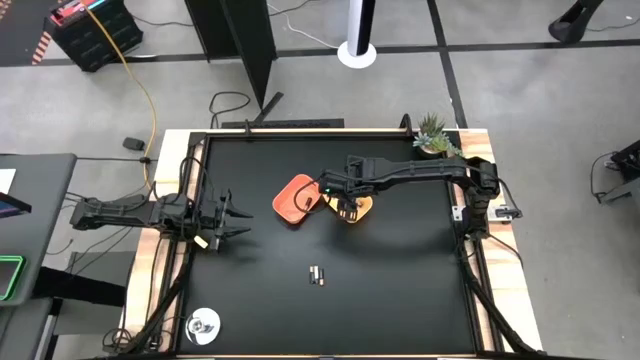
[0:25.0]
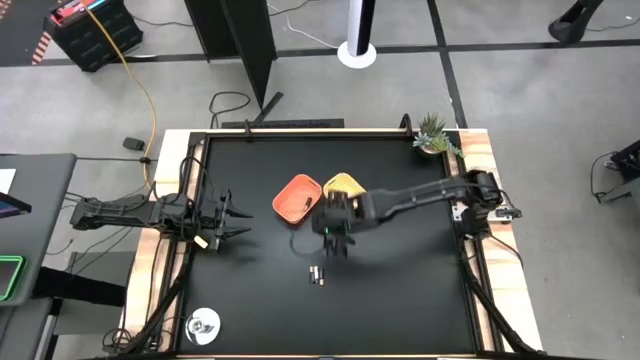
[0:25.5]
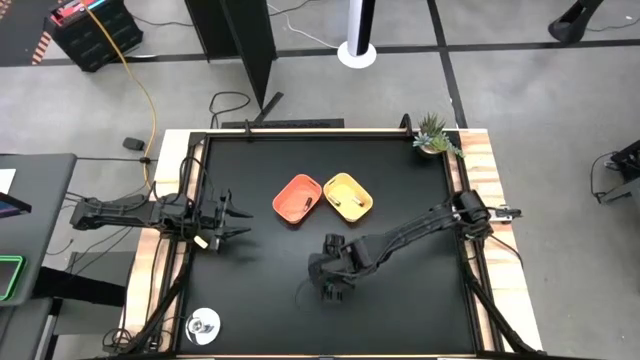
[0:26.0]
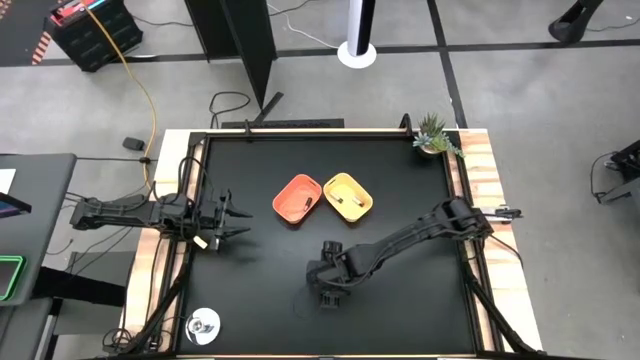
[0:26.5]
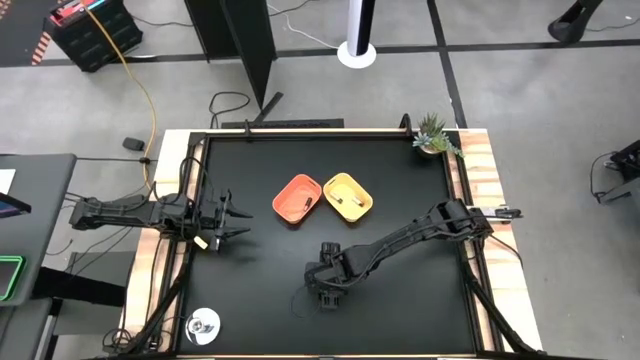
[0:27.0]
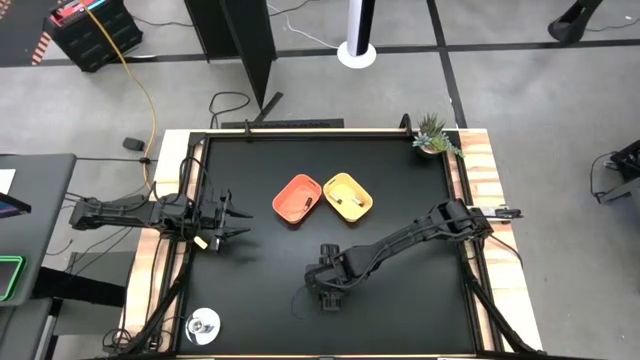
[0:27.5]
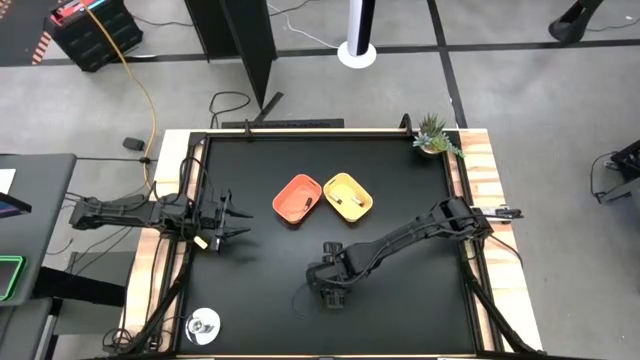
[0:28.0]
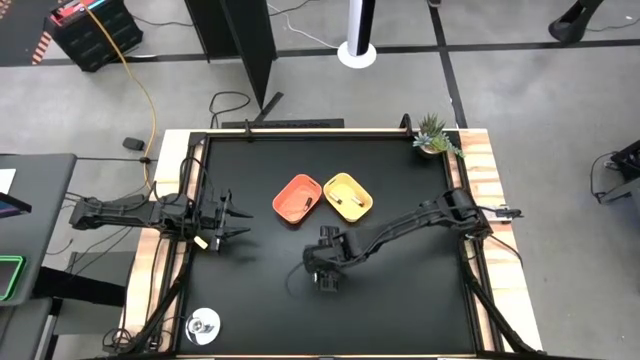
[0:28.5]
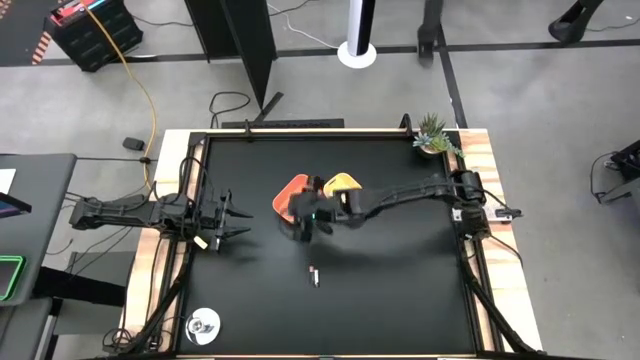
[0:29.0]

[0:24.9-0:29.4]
Task: Sort batteries
Put the black battery into the orange bin

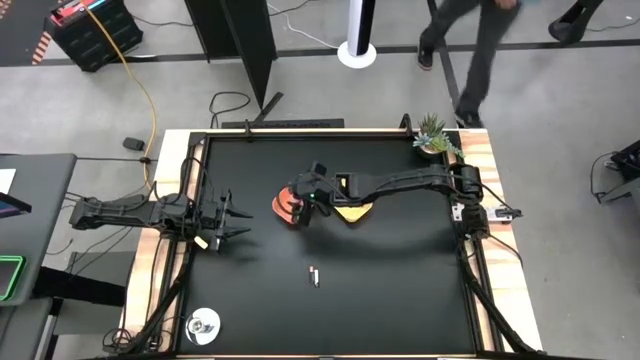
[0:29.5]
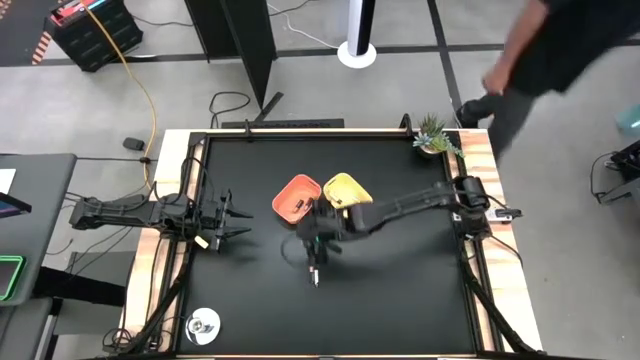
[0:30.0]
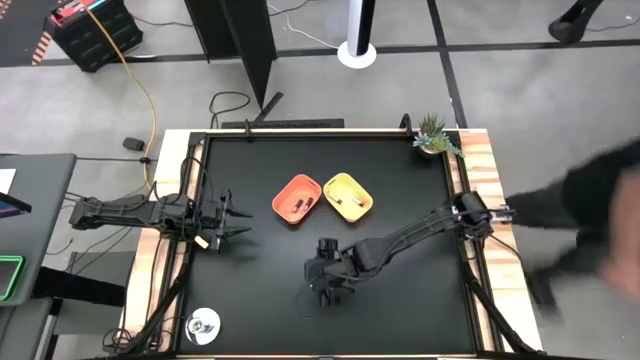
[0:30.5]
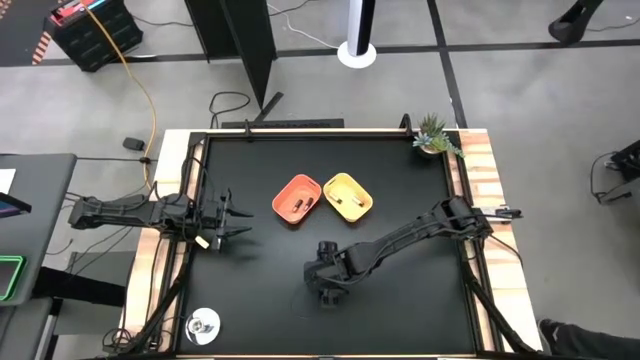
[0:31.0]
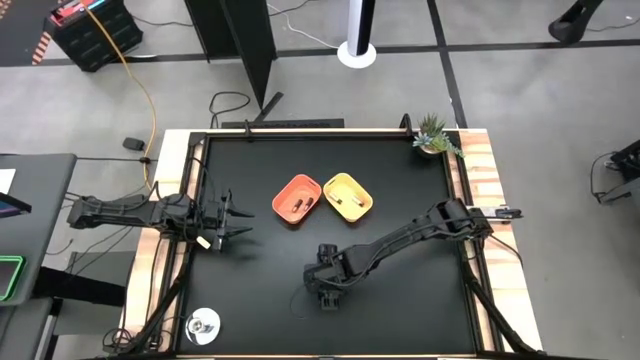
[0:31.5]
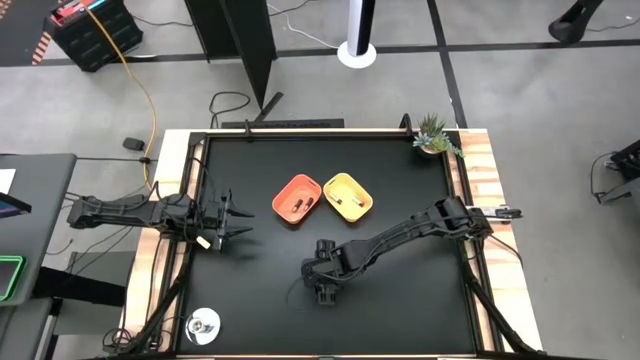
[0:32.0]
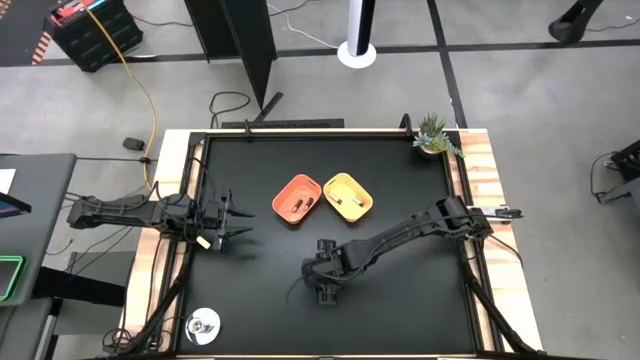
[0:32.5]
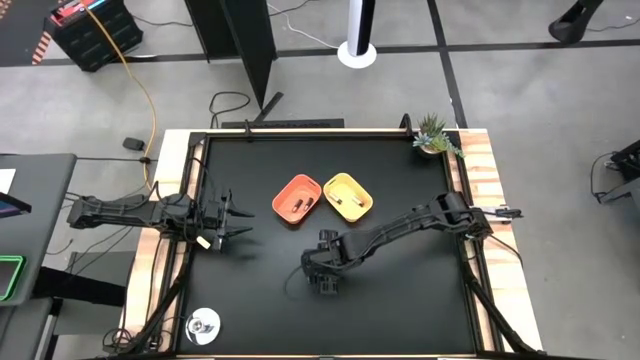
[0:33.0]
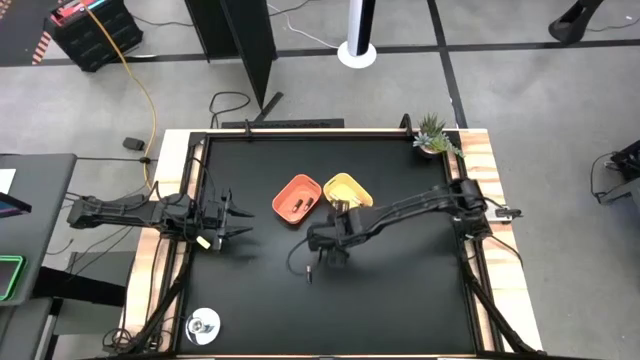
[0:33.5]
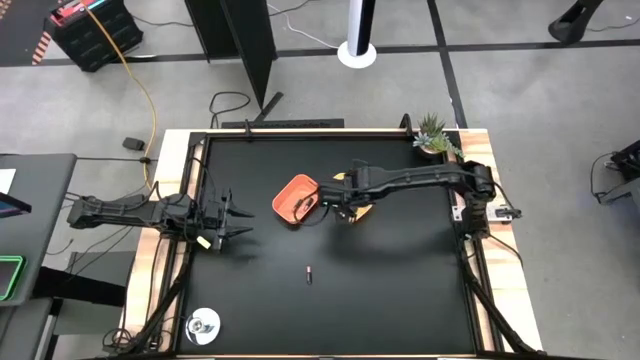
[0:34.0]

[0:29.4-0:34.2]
Put the white battery into the yellow bin

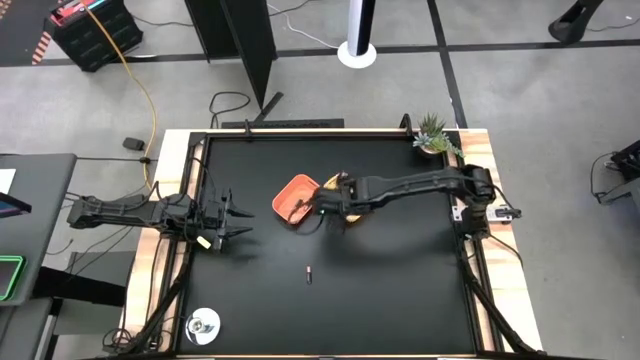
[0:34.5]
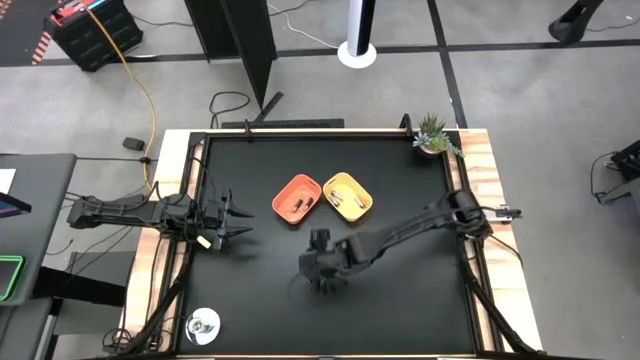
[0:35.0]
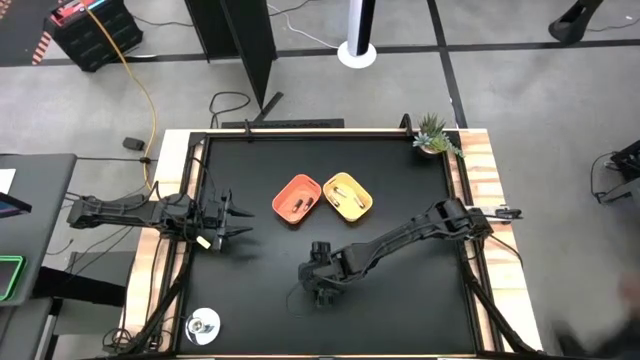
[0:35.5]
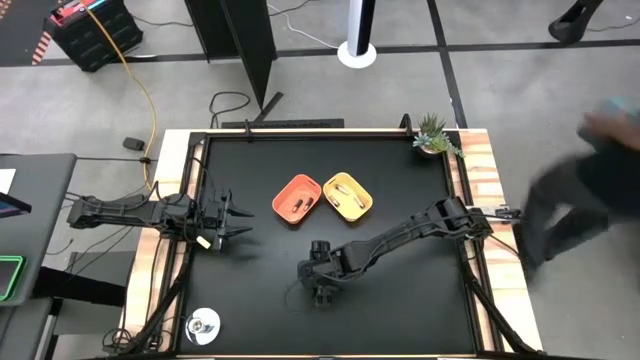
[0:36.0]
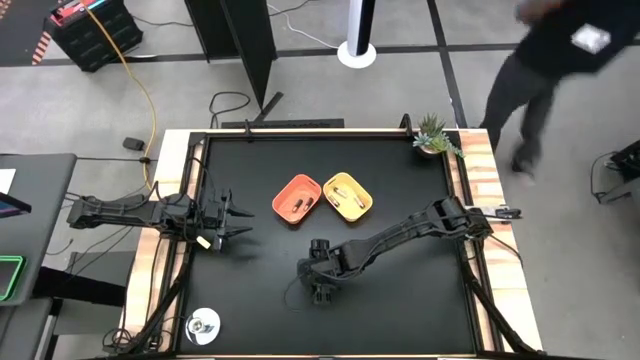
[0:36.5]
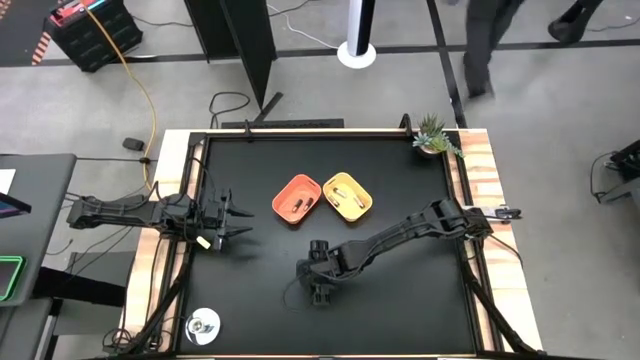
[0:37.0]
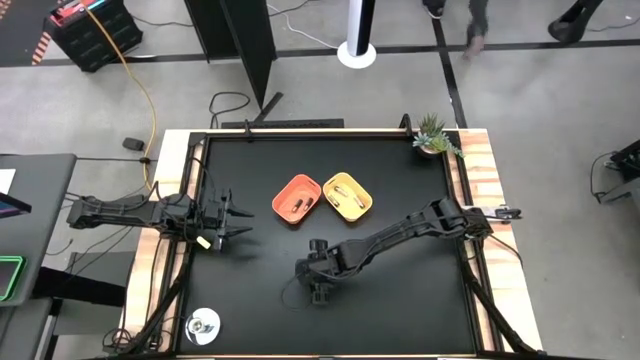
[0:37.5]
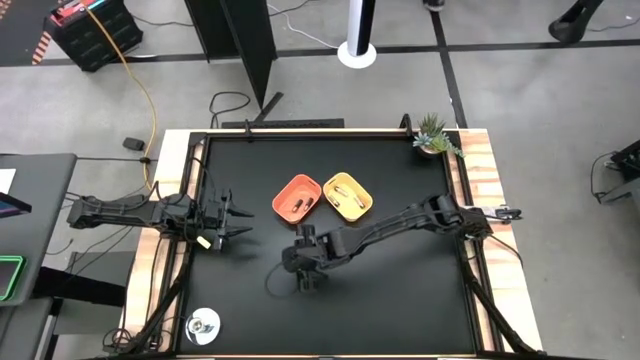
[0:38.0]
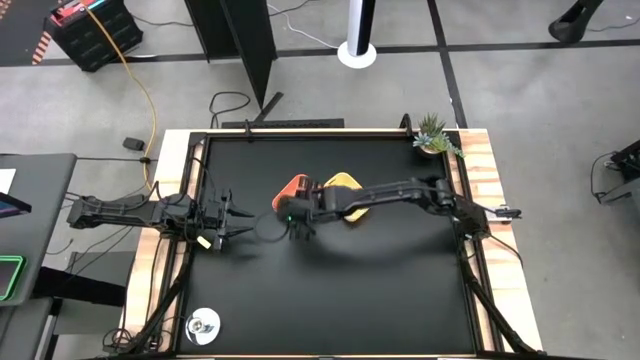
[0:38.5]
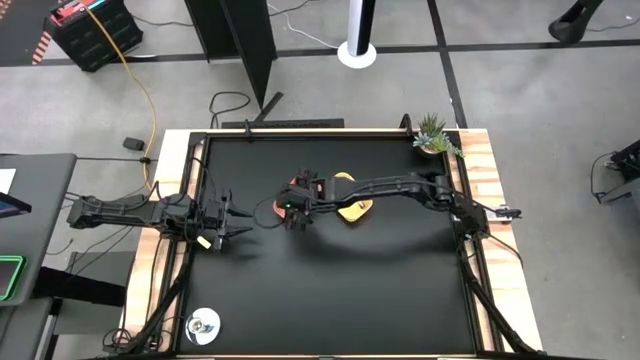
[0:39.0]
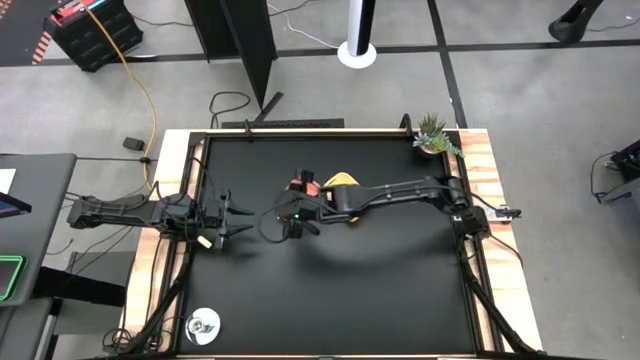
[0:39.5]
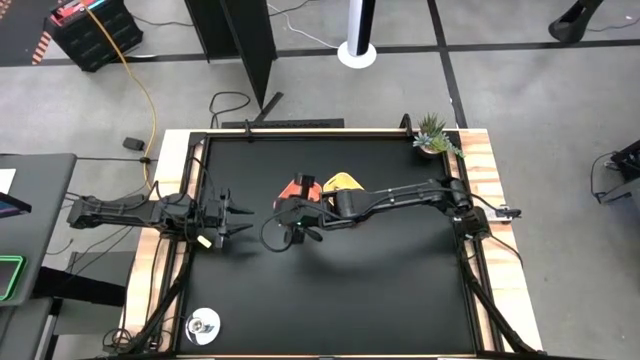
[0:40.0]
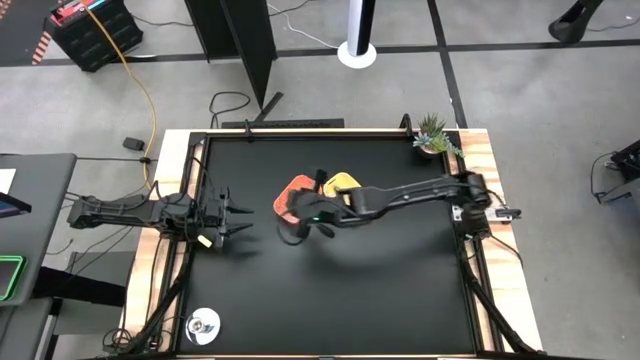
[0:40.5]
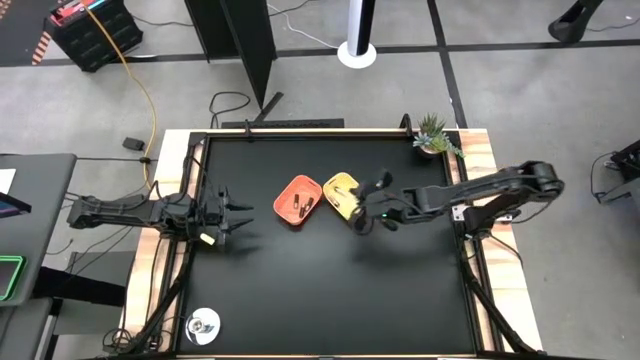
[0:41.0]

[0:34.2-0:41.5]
Put the black battery into the orange bin

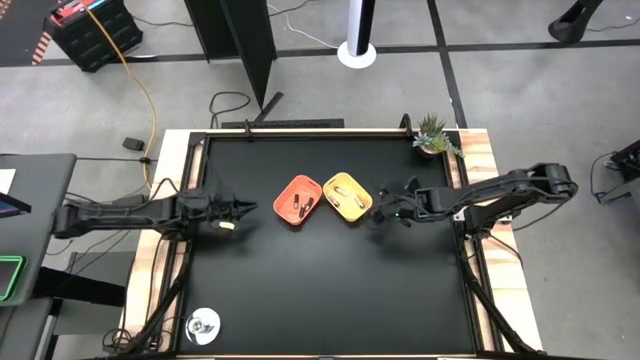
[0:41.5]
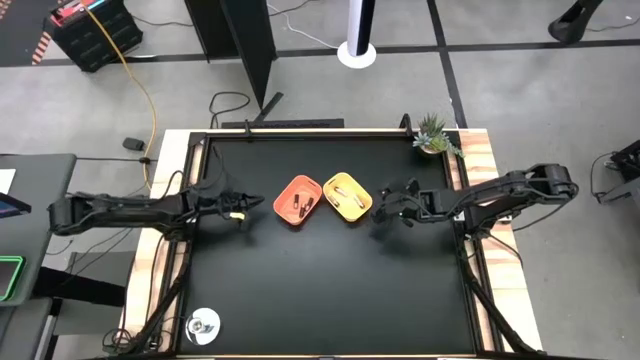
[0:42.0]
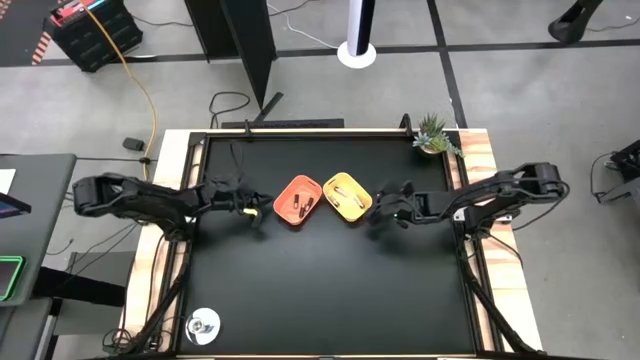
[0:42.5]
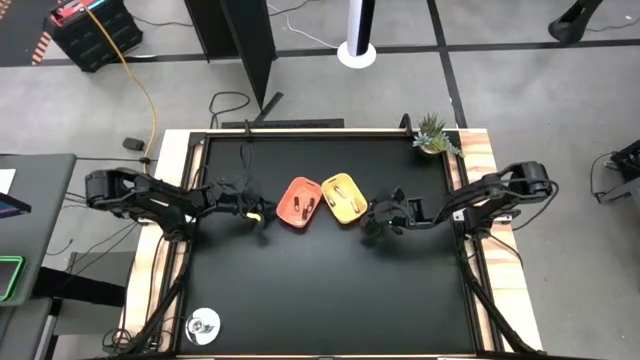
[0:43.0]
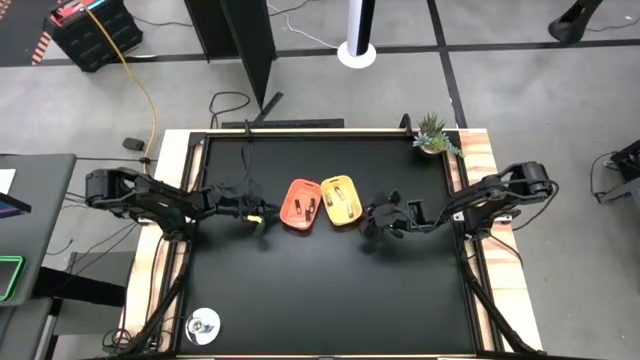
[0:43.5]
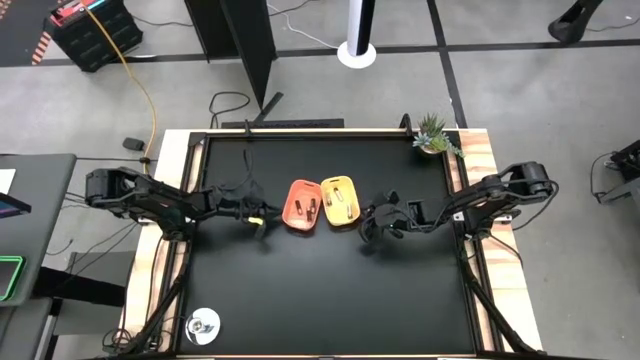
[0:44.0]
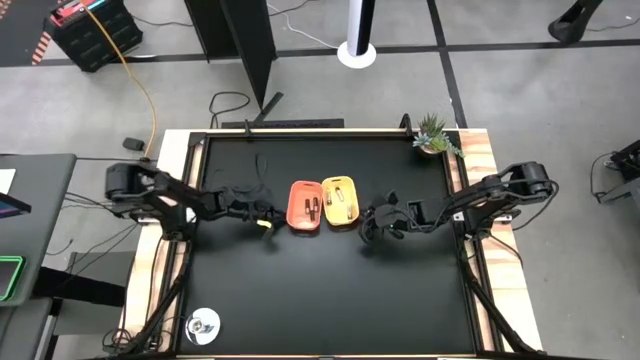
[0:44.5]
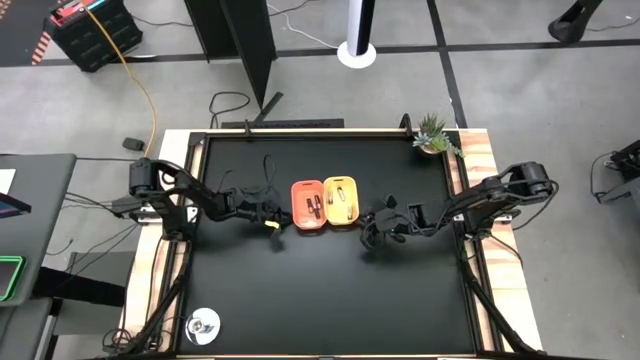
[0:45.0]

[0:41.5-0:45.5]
Adjust the bins

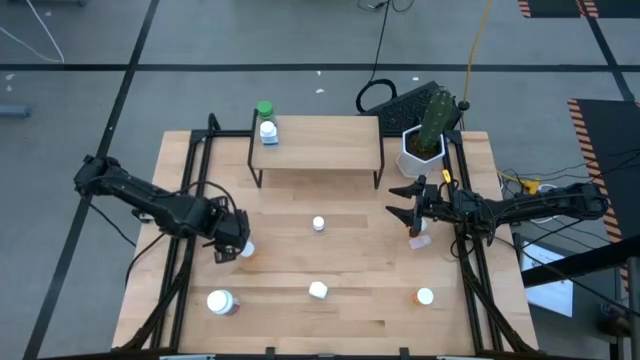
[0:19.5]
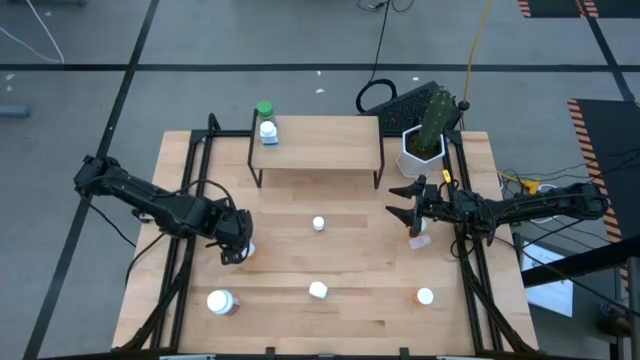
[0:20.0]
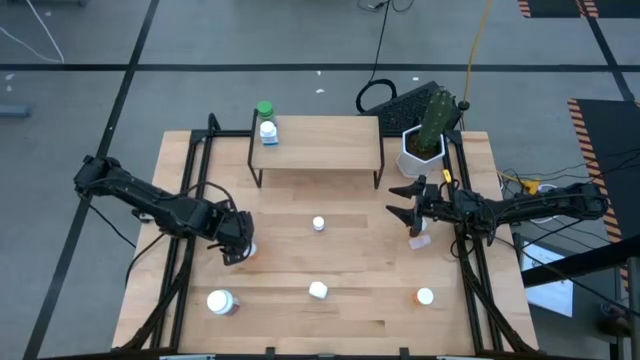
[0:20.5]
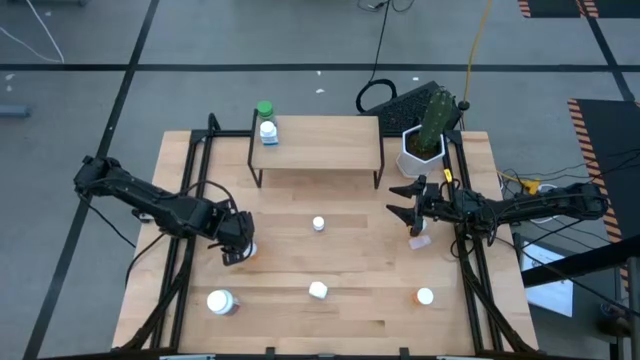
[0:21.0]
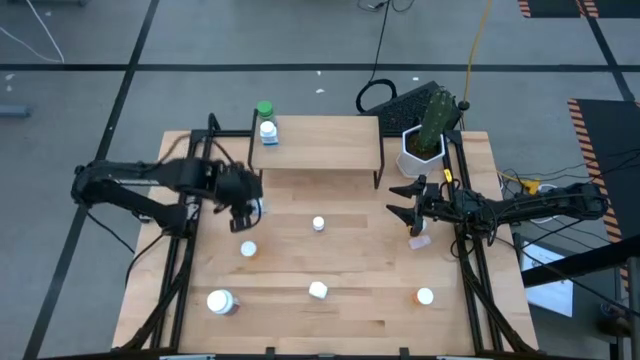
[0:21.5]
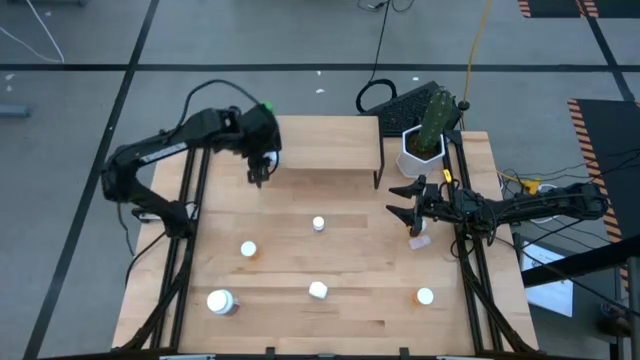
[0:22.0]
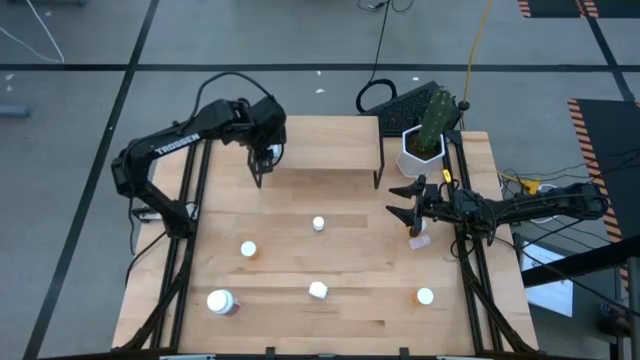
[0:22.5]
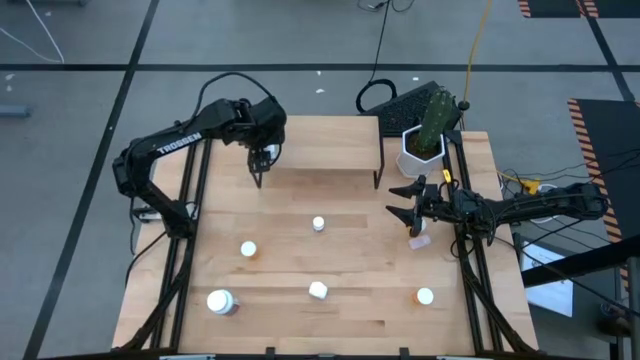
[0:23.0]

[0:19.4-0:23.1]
Task: Pick and place medicine bottles onto shelf by color
Put the top left white pill bottle onto the shelf
